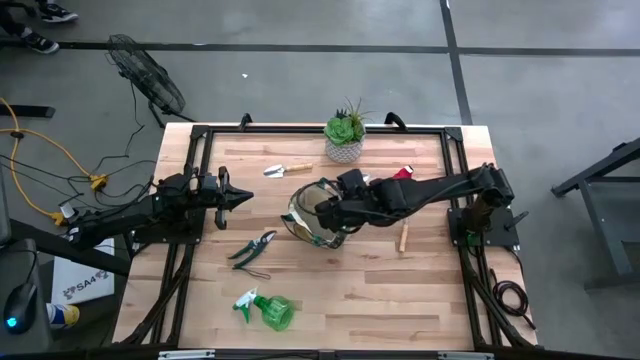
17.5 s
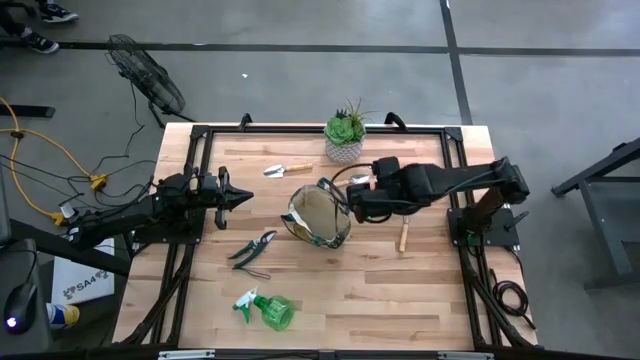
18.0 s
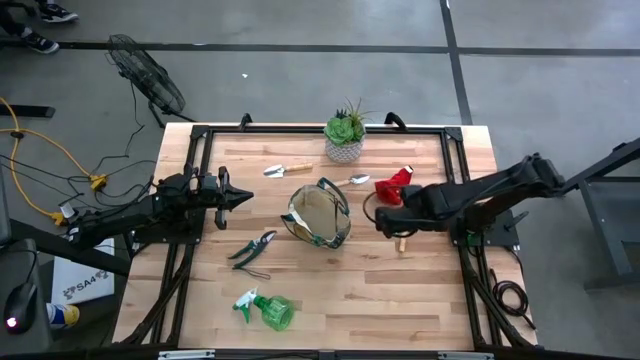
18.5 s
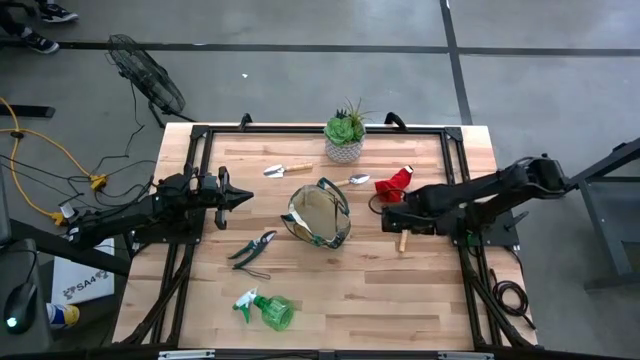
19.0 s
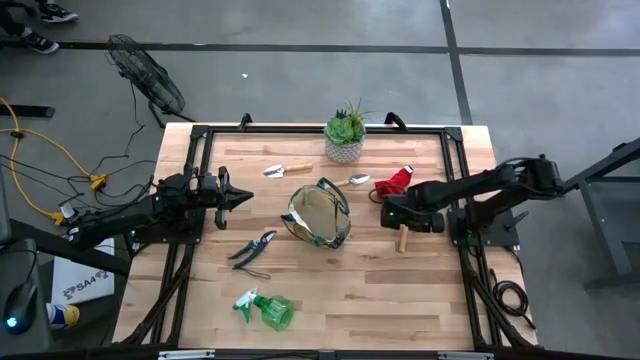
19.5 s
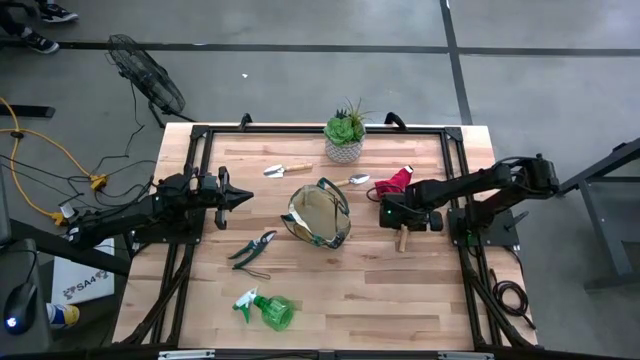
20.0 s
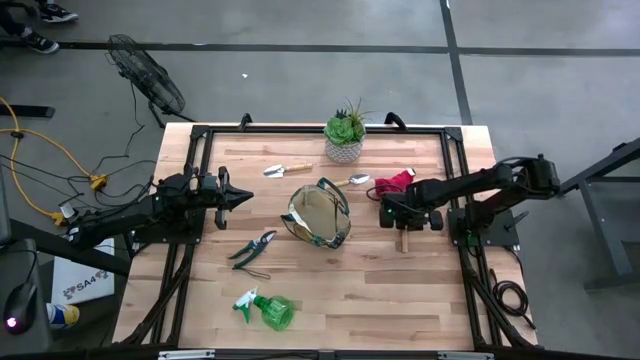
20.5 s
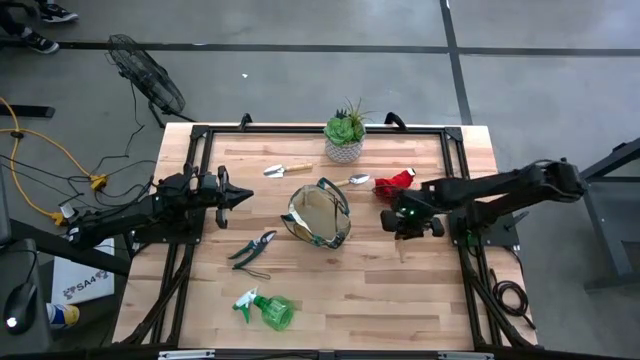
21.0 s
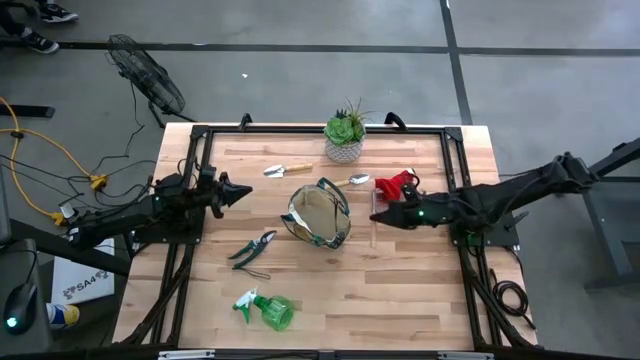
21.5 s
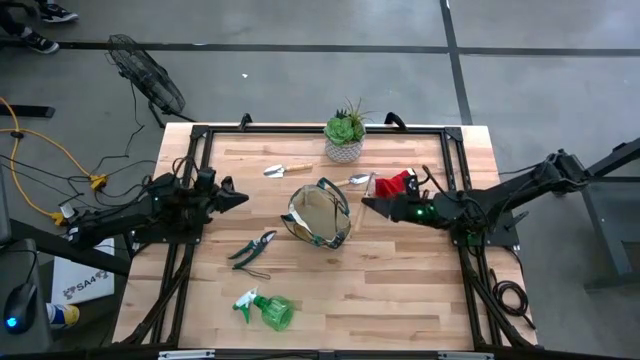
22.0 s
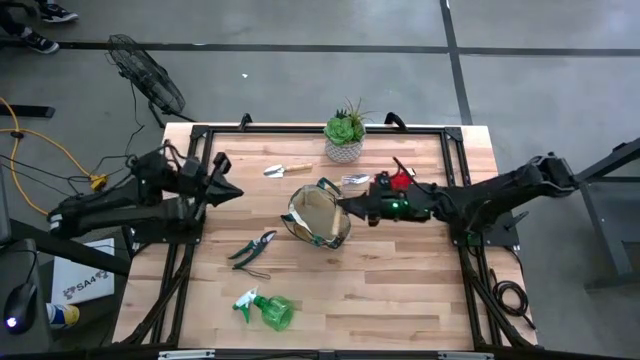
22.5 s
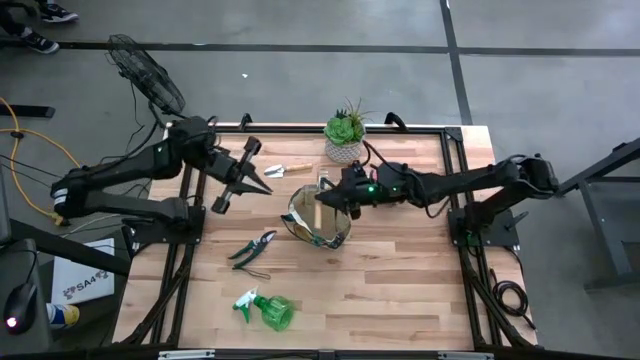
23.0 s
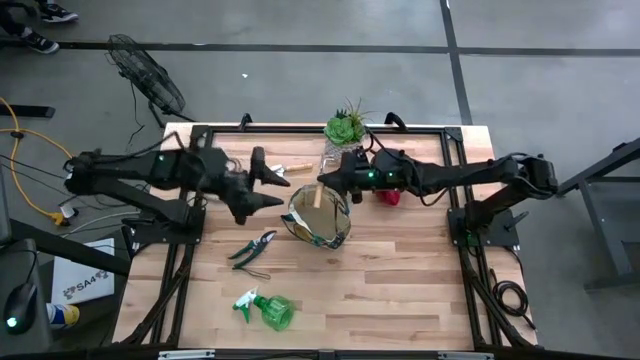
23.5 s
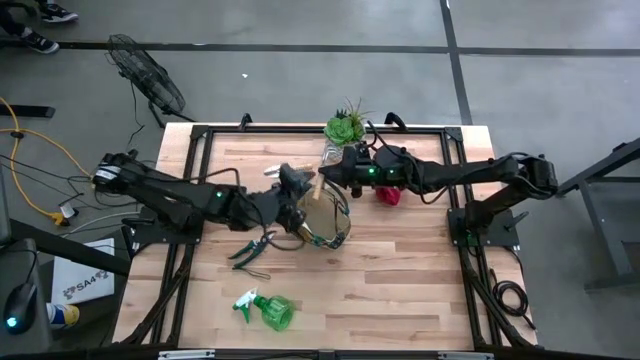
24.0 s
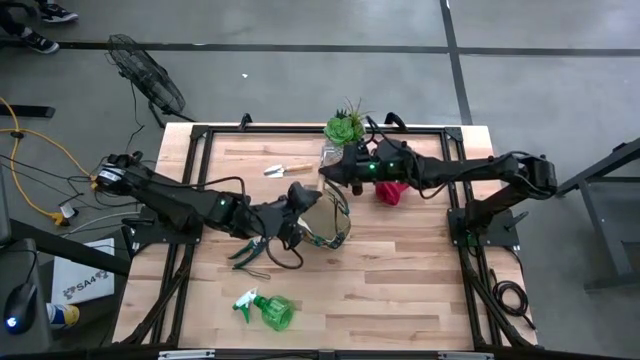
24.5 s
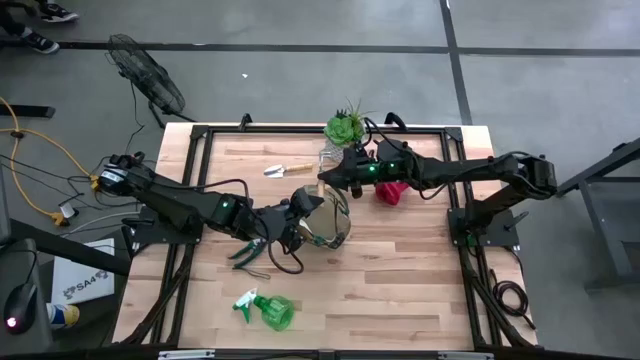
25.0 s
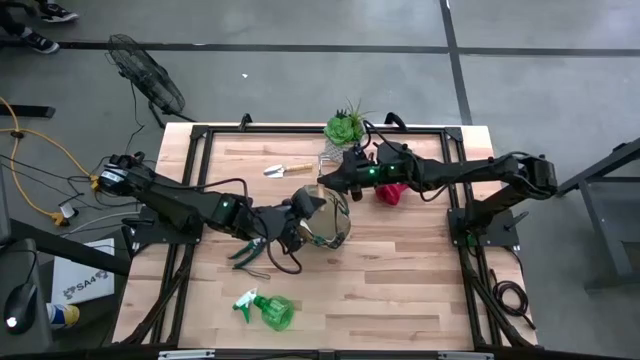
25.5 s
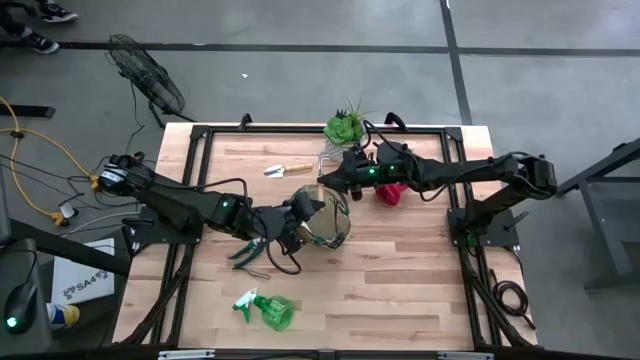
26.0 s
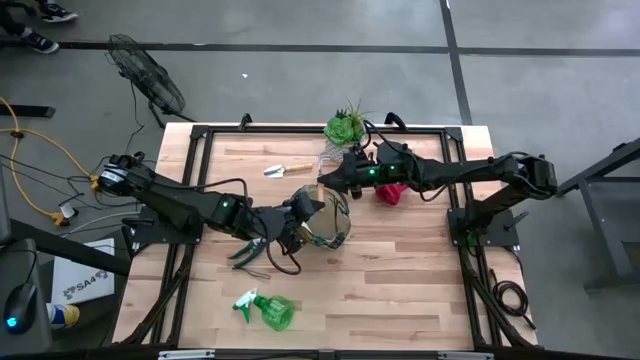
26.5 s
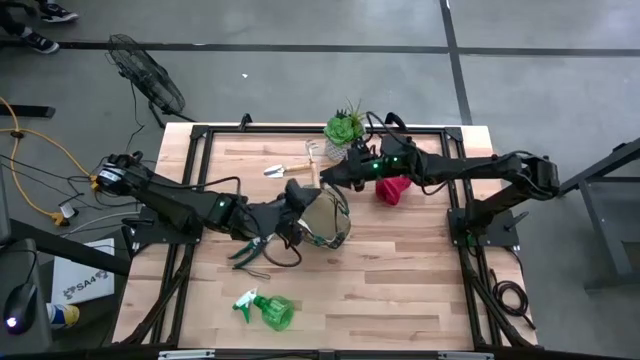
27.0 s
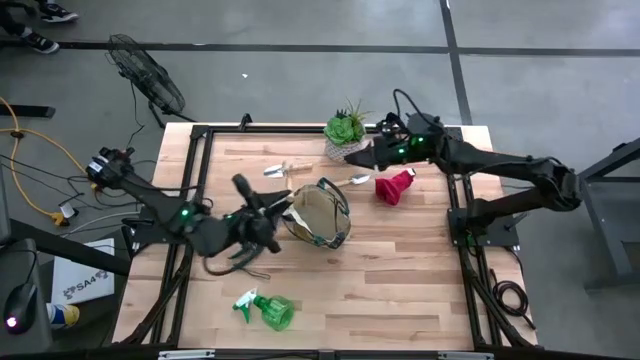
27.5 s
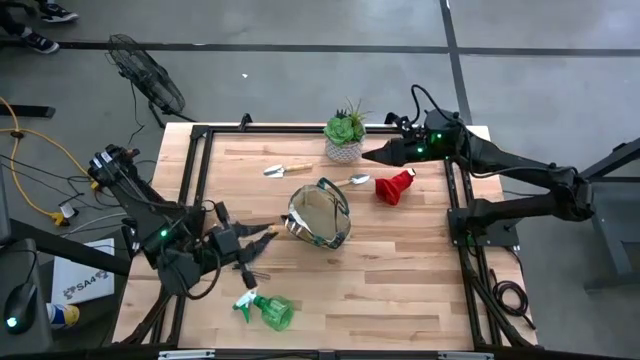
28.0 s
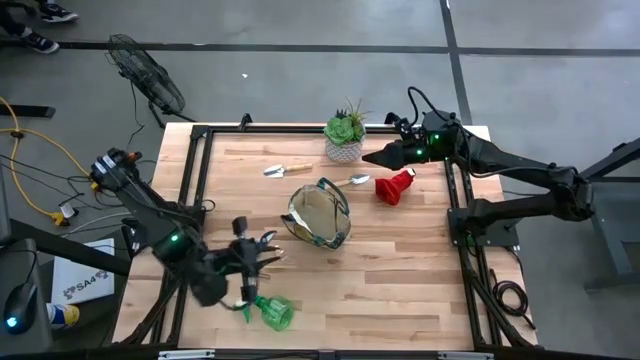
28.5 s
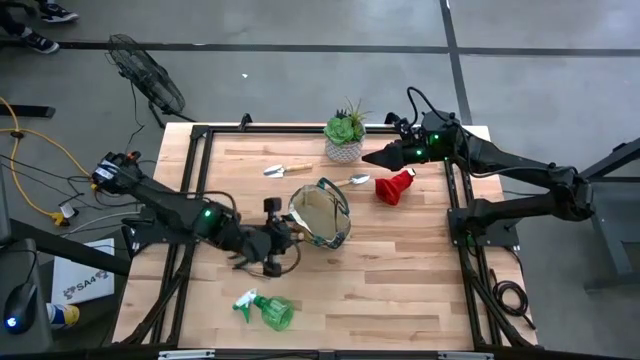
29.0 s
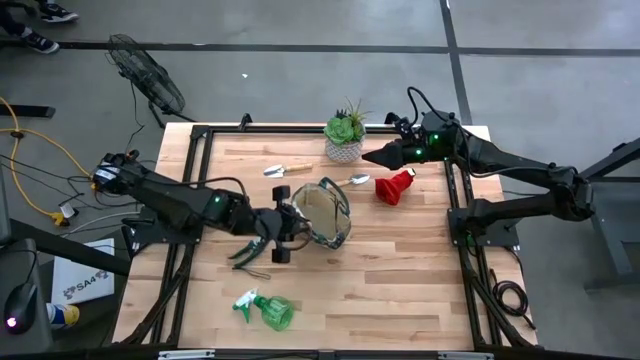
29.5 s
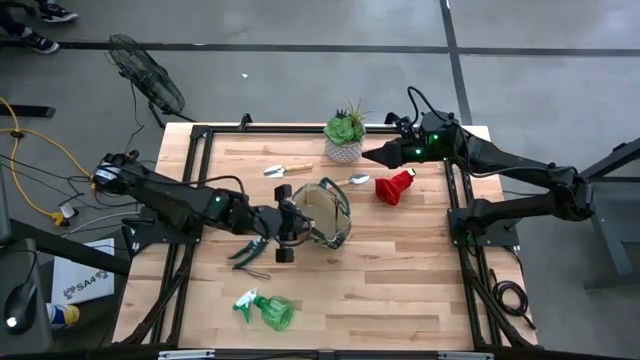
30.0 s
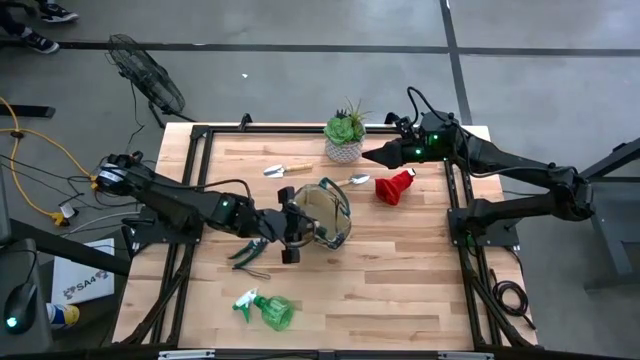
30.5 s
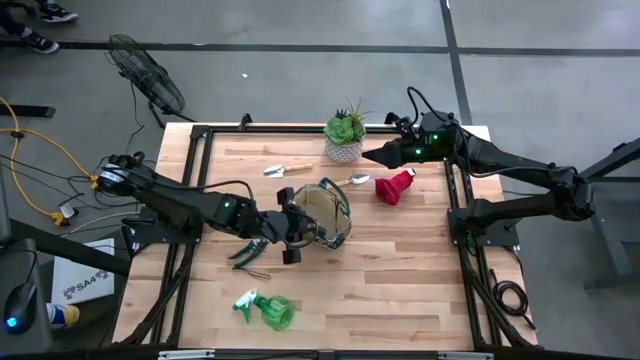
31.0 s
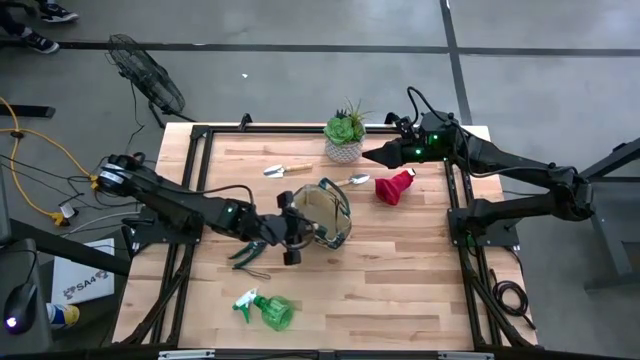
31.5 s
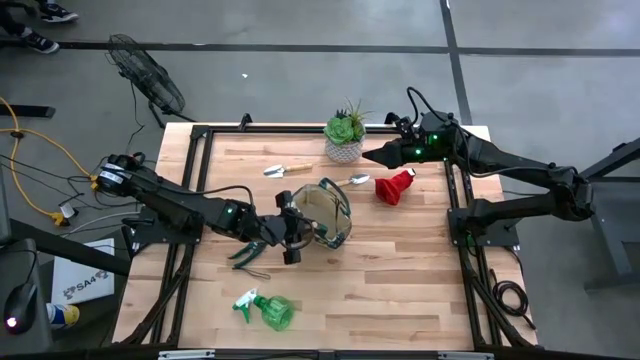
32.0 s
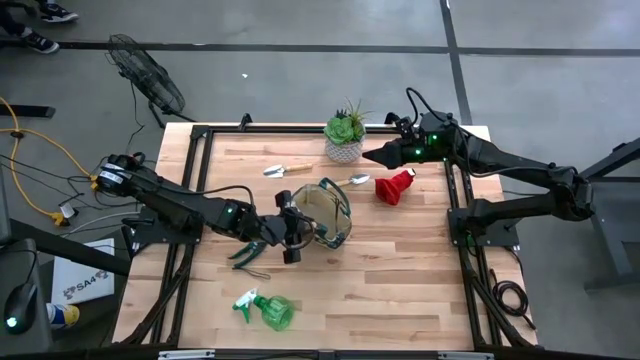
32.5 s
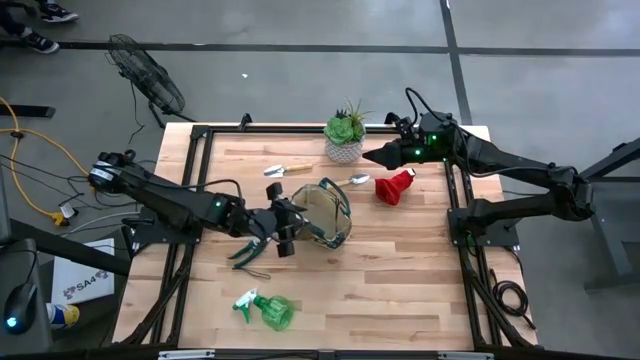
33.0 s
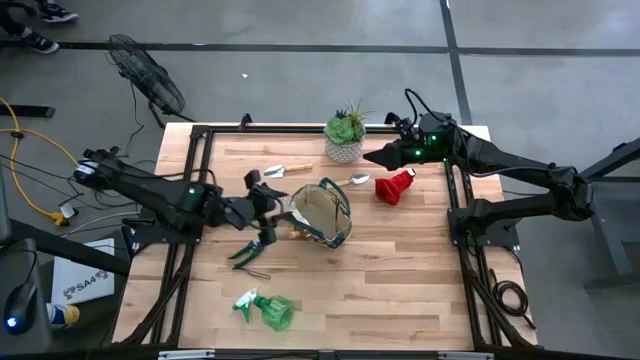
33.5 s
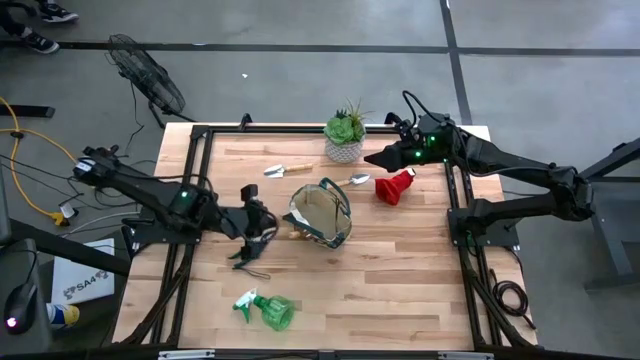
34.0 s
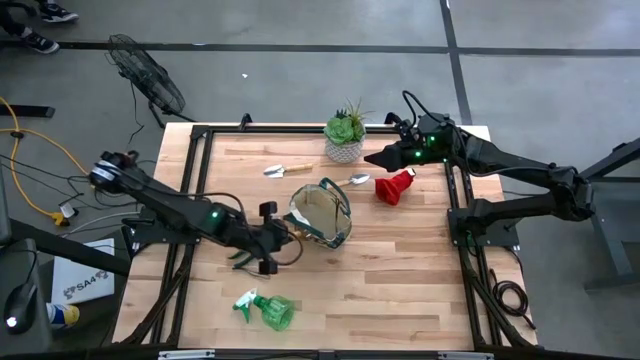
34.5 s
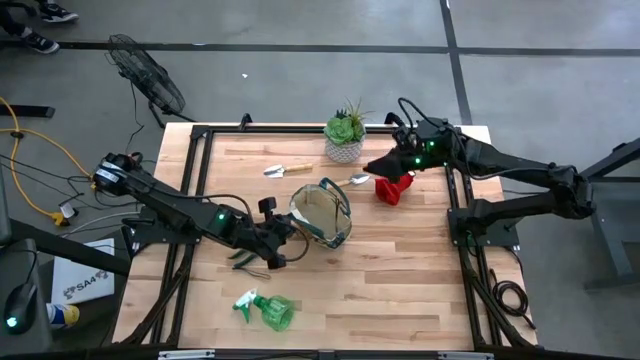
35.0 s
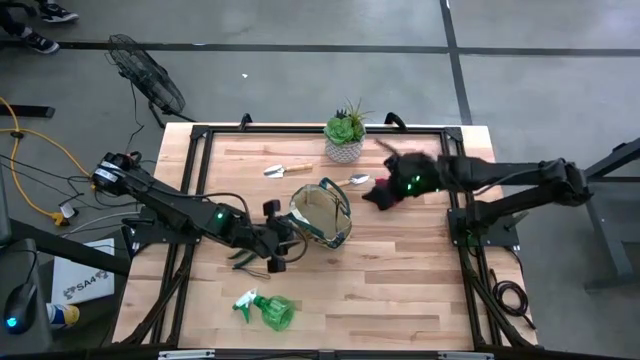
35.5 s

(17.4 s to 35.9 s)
Task: Pick & Place Garden tools in Gardening bag
Put the brown hand rake into the brown gardening bag

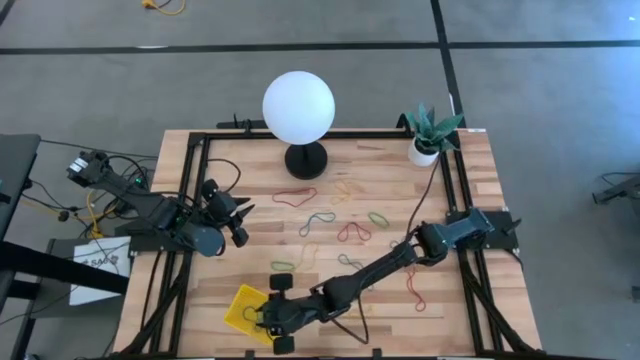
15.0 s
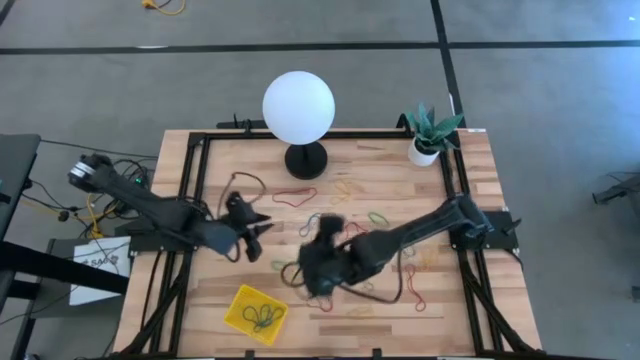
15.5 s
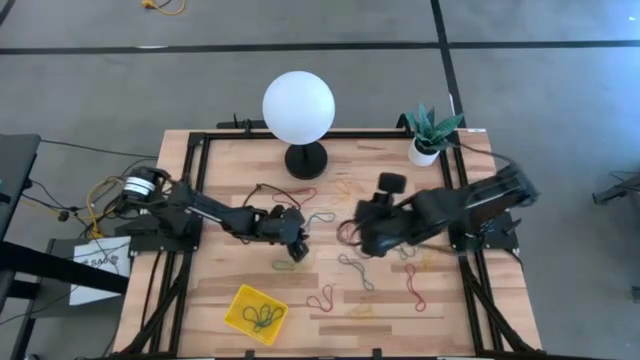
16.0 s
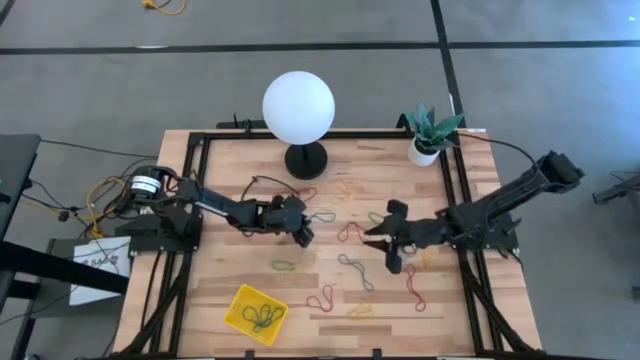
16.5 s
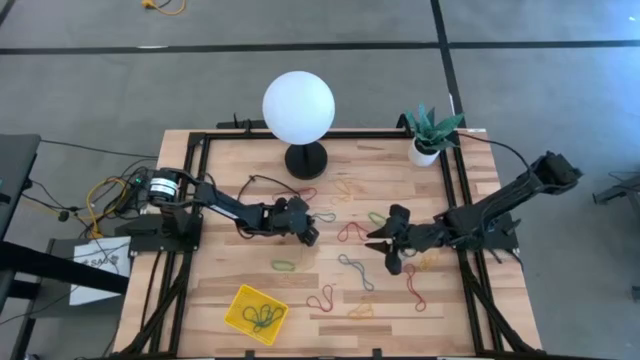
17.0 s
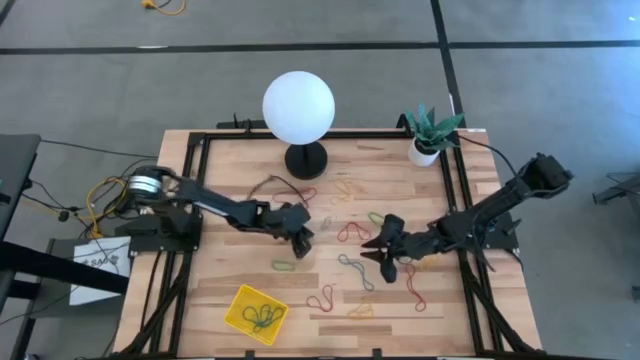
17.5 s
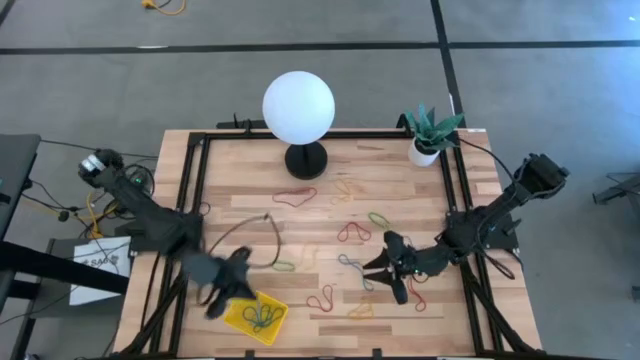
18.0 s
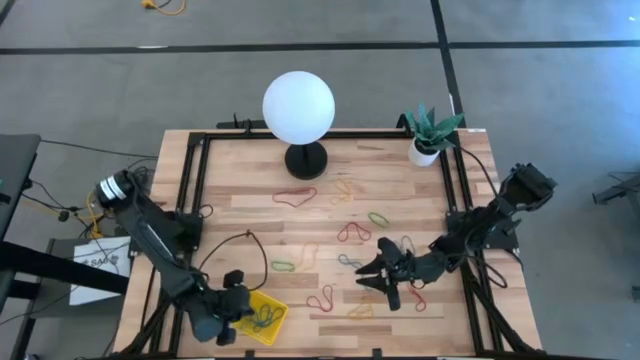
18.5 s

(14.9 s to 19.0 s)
Task: Pick and place items into bin
Put the blue rubber band into the yellow bin
